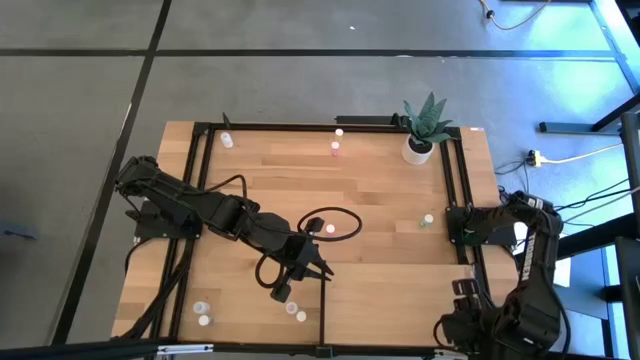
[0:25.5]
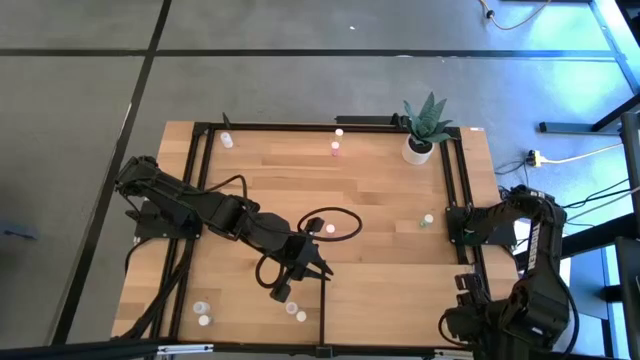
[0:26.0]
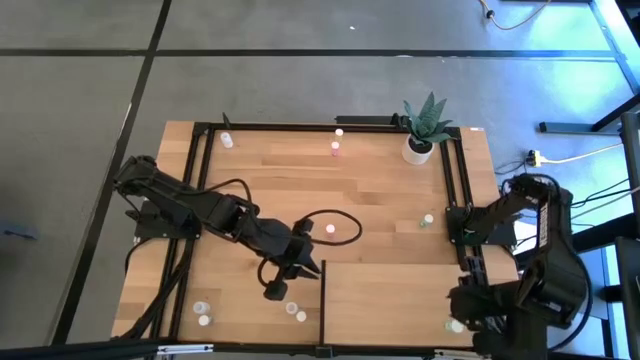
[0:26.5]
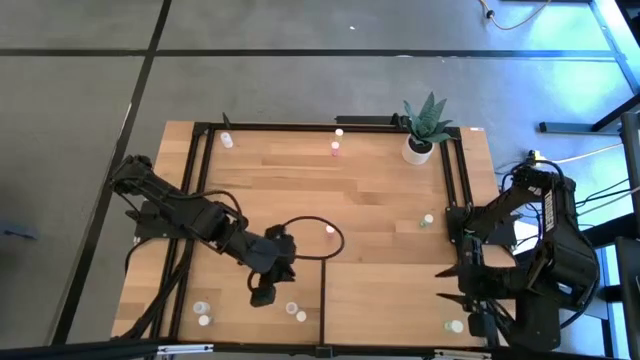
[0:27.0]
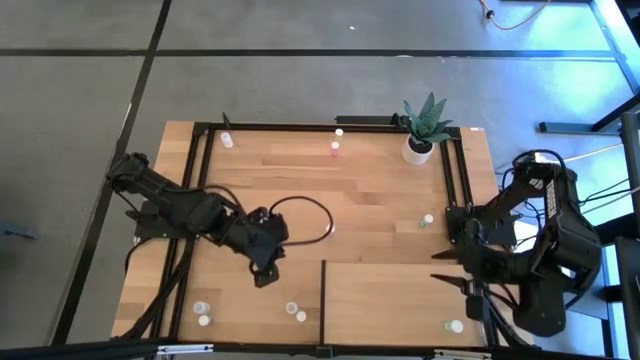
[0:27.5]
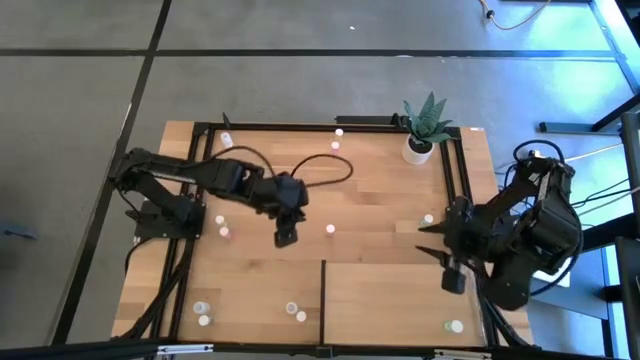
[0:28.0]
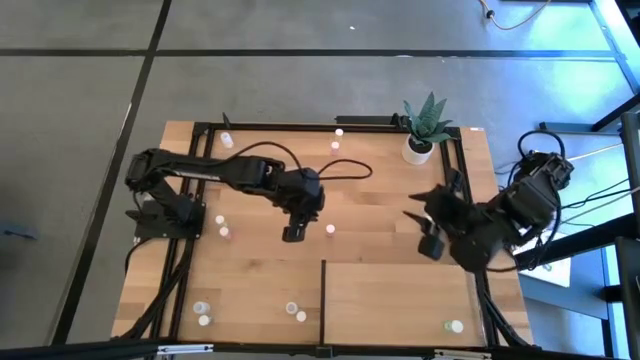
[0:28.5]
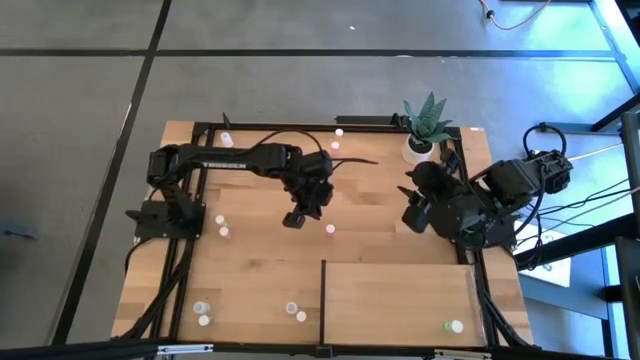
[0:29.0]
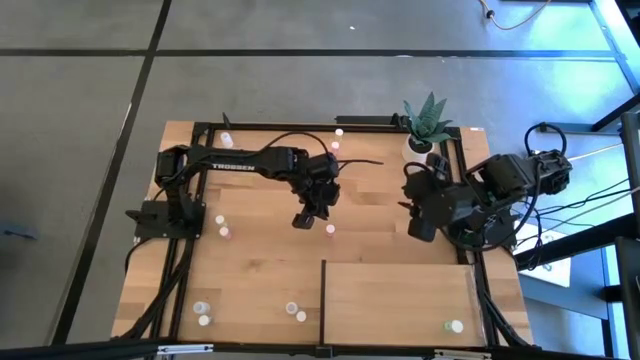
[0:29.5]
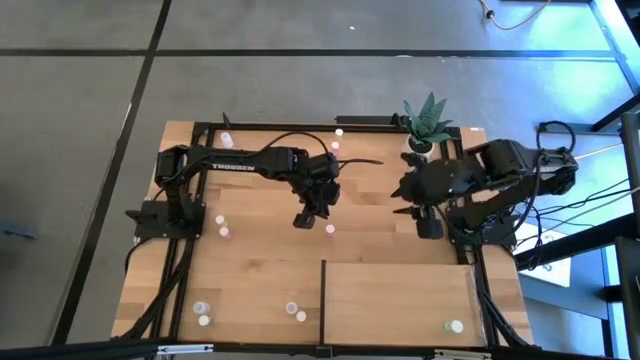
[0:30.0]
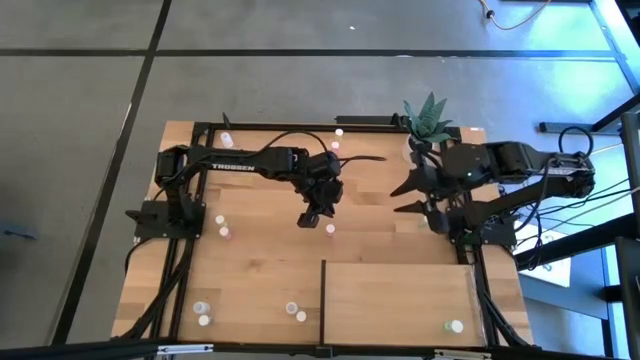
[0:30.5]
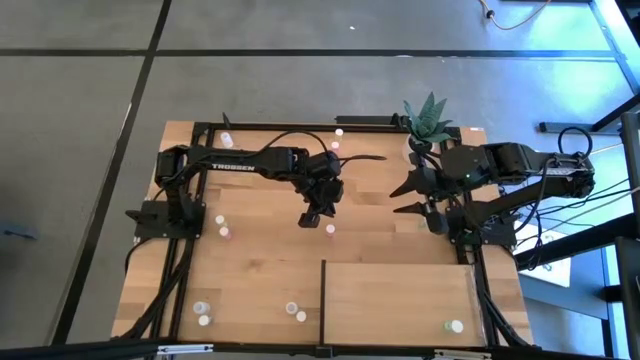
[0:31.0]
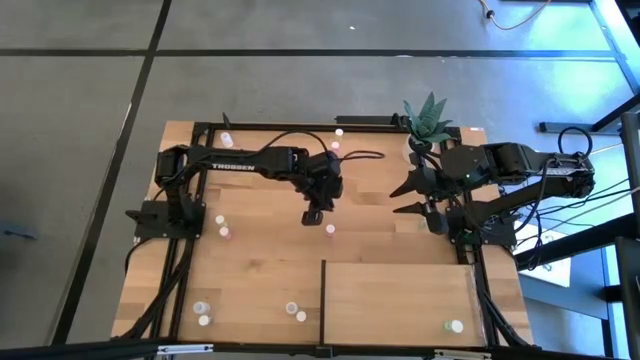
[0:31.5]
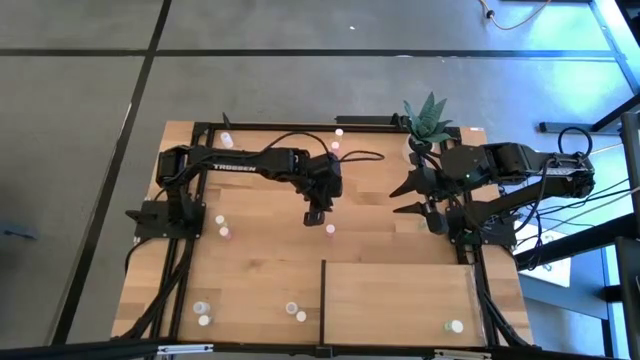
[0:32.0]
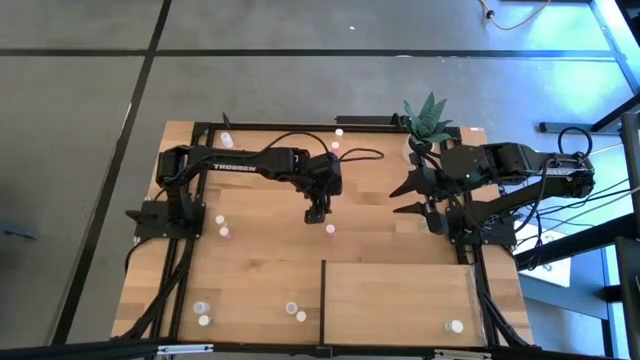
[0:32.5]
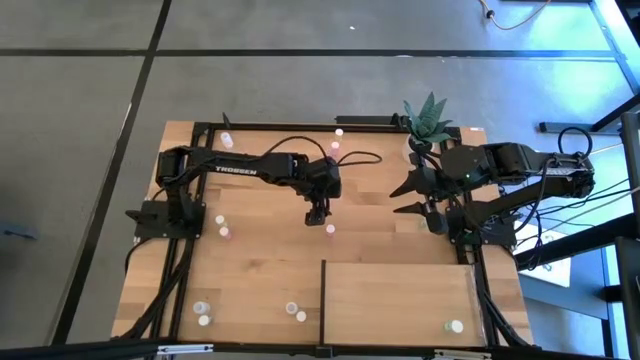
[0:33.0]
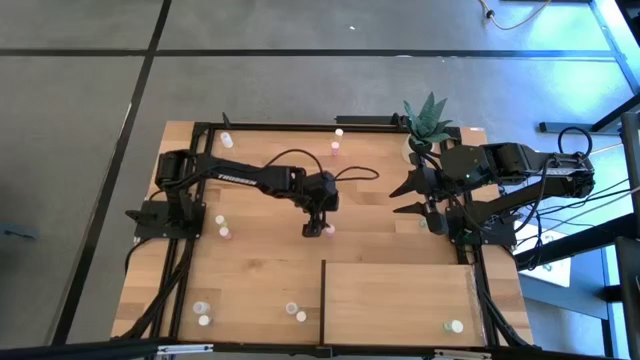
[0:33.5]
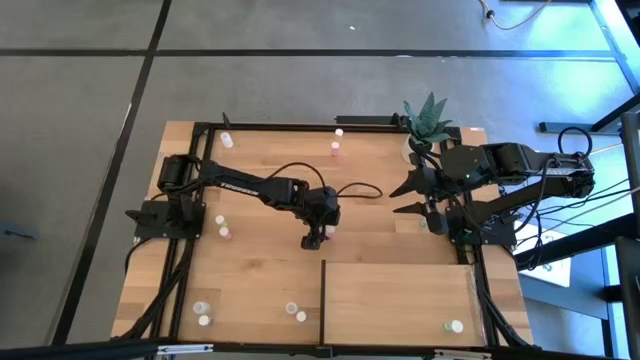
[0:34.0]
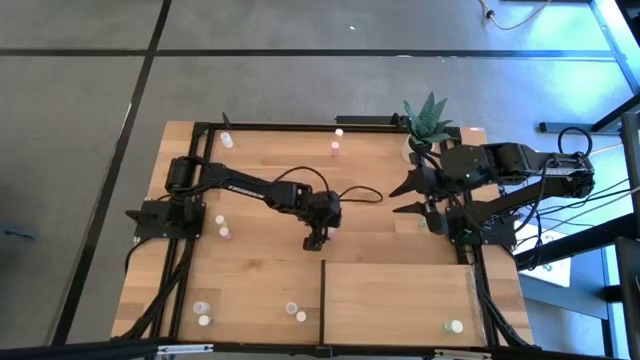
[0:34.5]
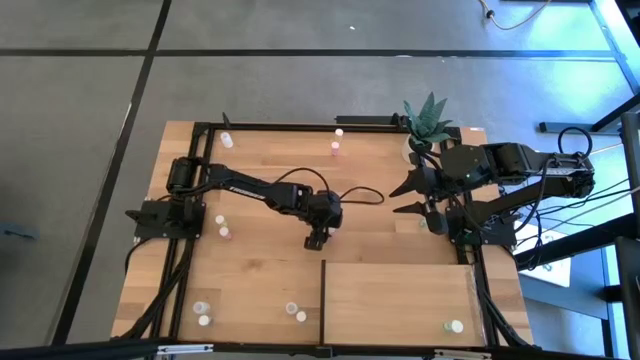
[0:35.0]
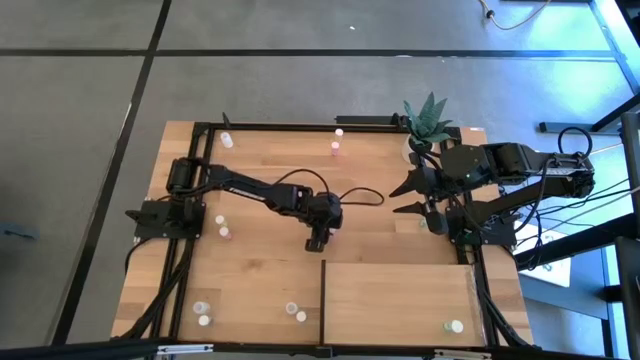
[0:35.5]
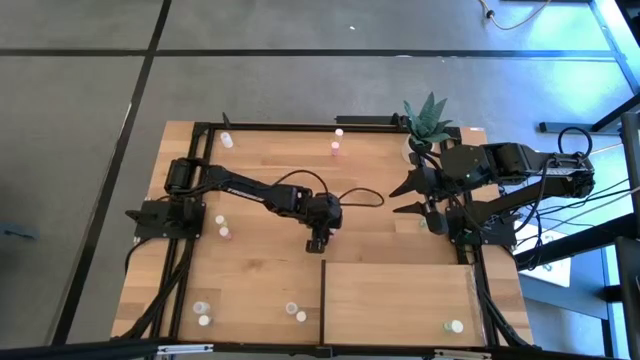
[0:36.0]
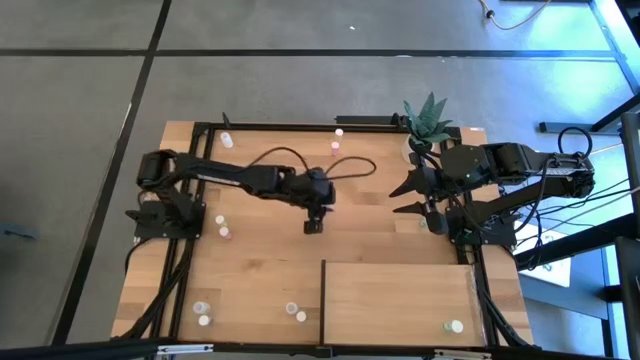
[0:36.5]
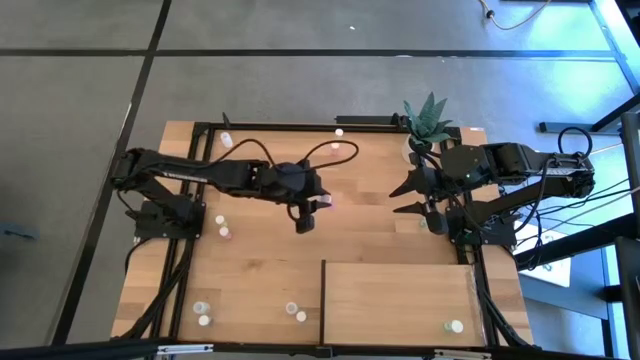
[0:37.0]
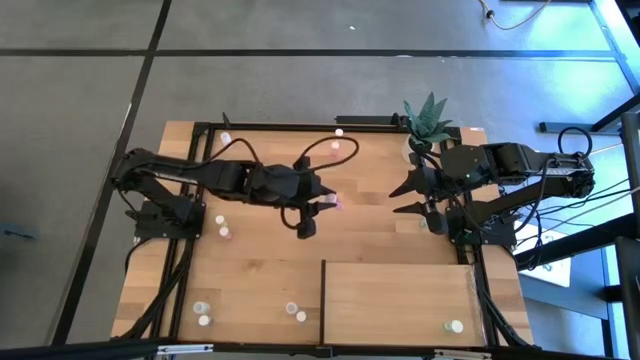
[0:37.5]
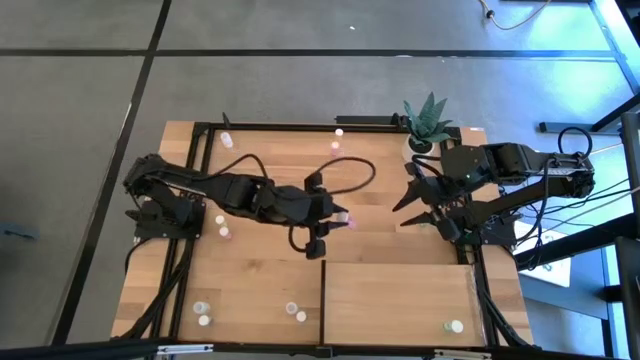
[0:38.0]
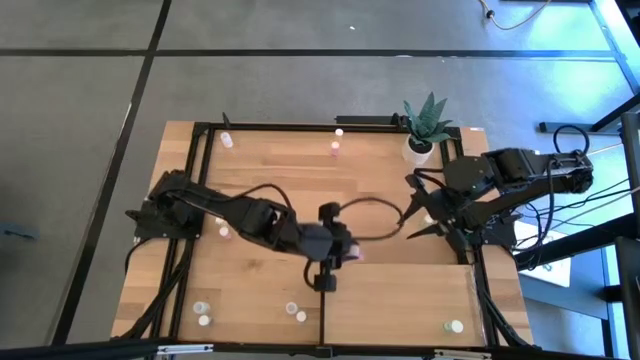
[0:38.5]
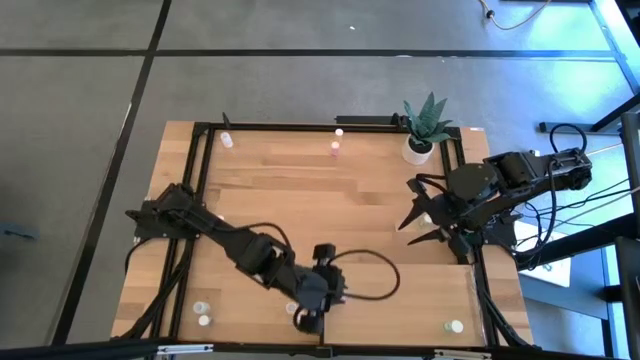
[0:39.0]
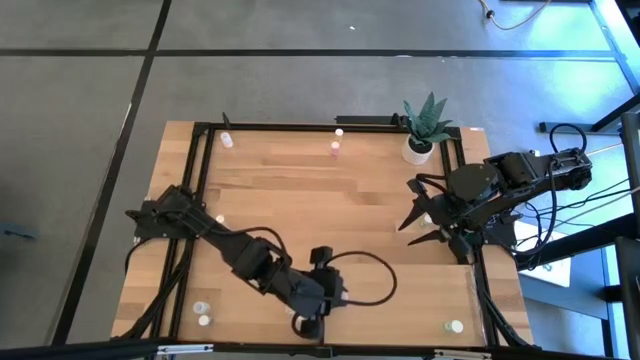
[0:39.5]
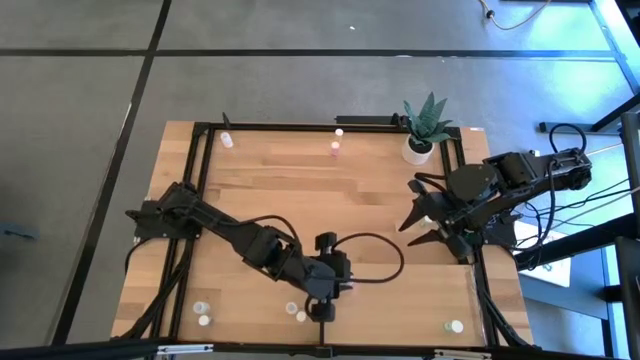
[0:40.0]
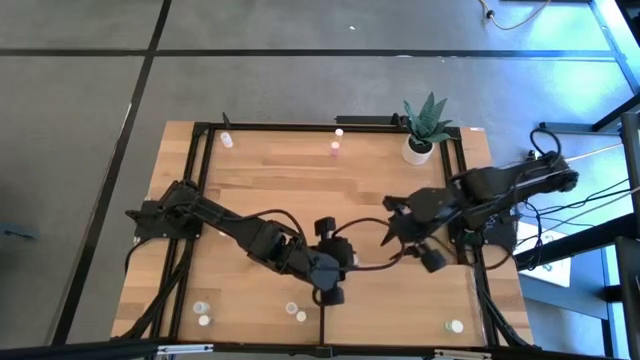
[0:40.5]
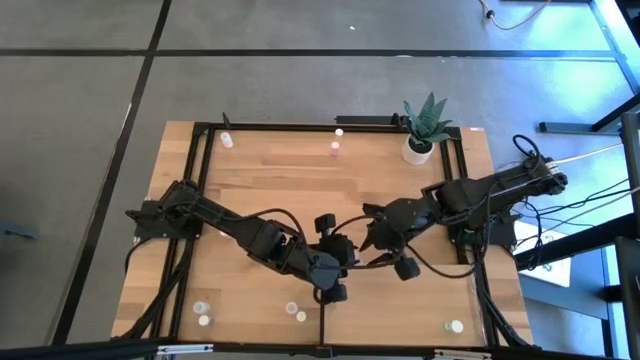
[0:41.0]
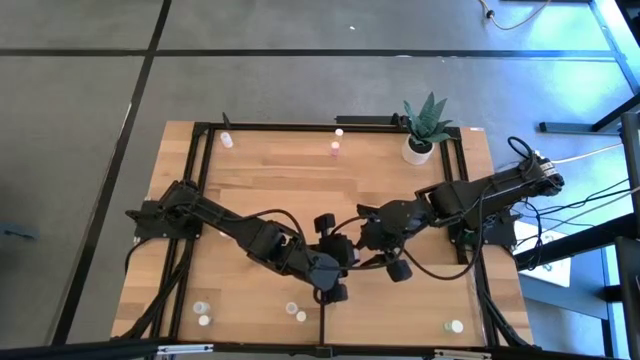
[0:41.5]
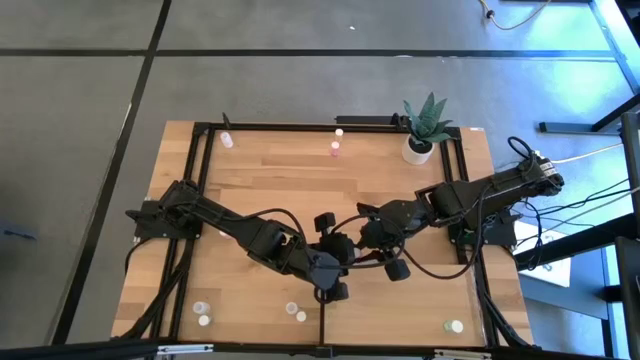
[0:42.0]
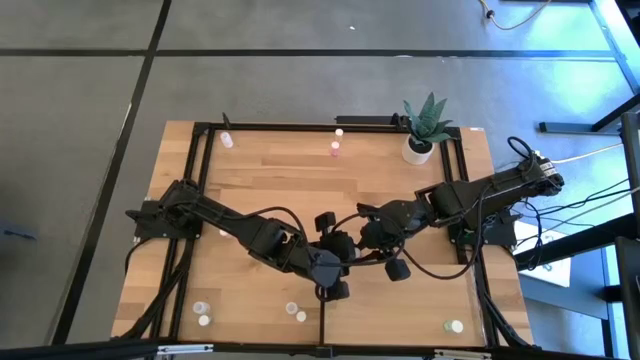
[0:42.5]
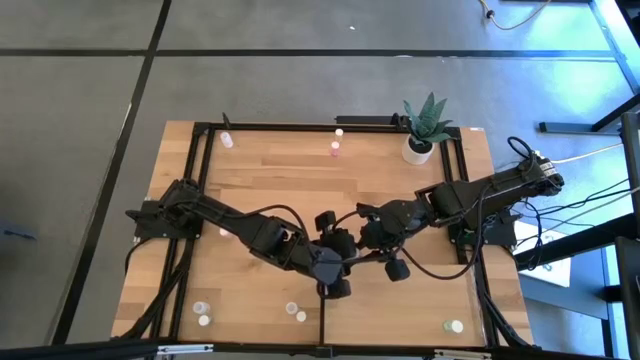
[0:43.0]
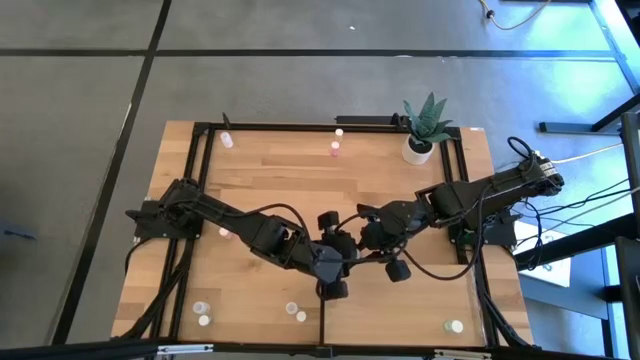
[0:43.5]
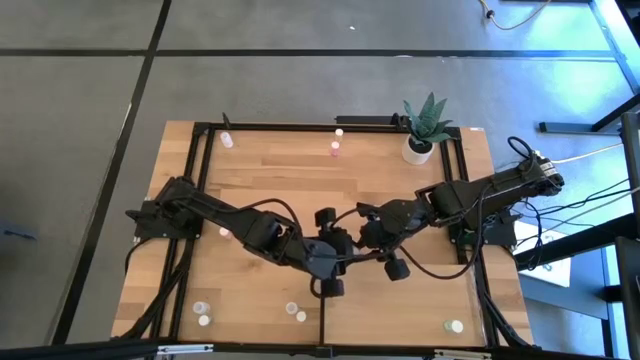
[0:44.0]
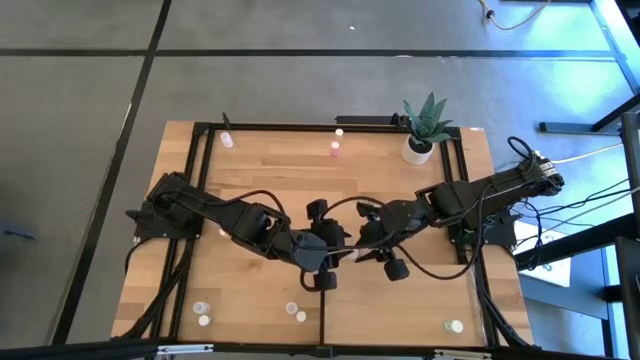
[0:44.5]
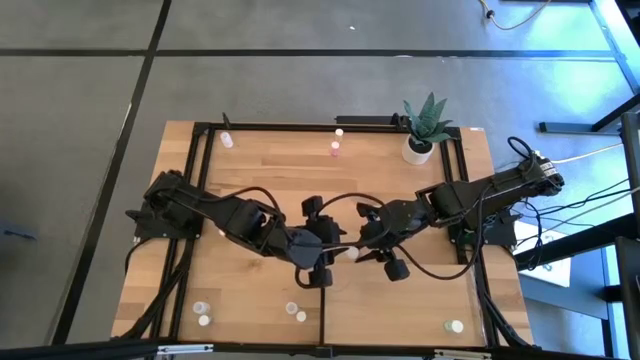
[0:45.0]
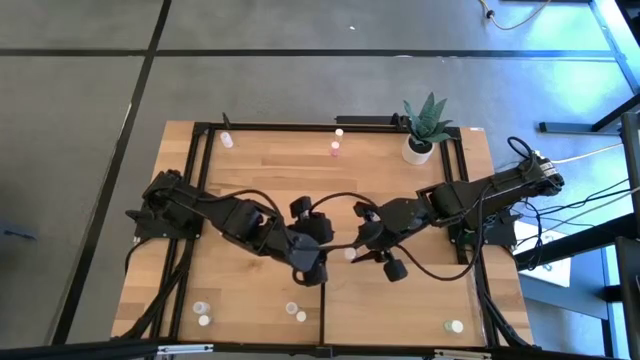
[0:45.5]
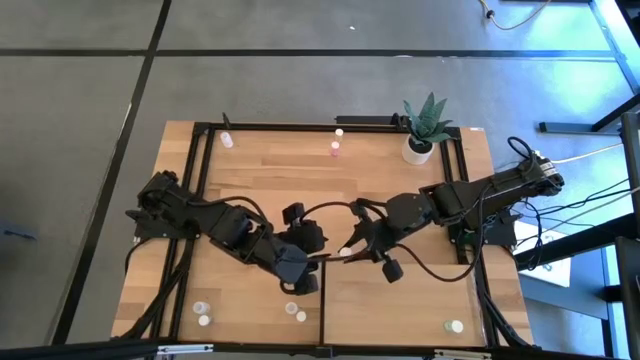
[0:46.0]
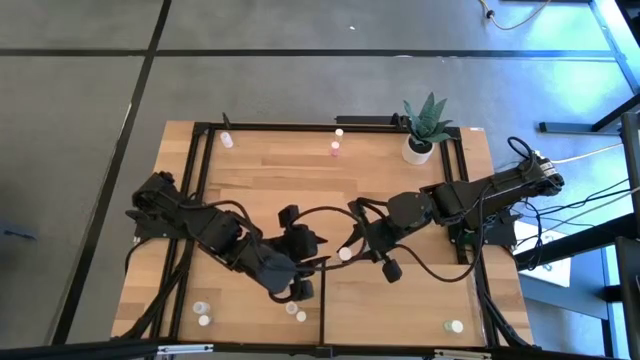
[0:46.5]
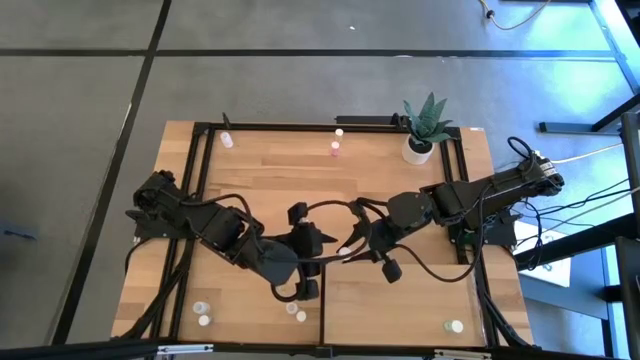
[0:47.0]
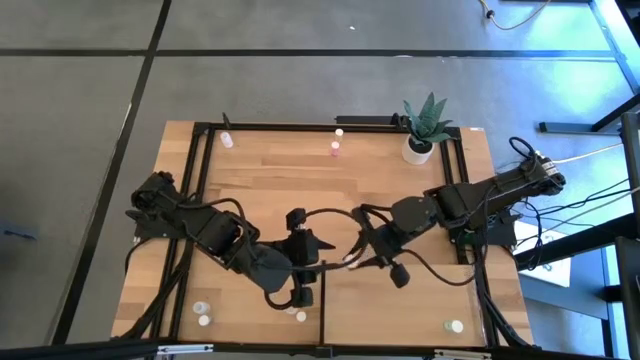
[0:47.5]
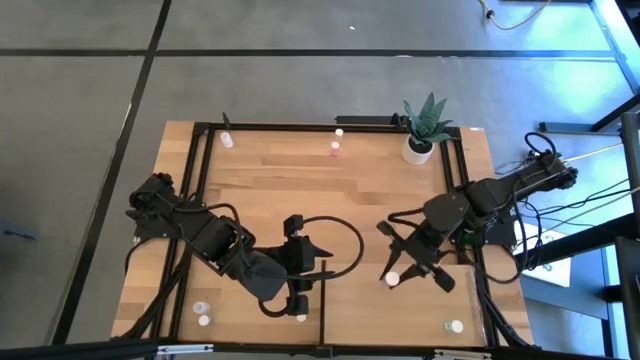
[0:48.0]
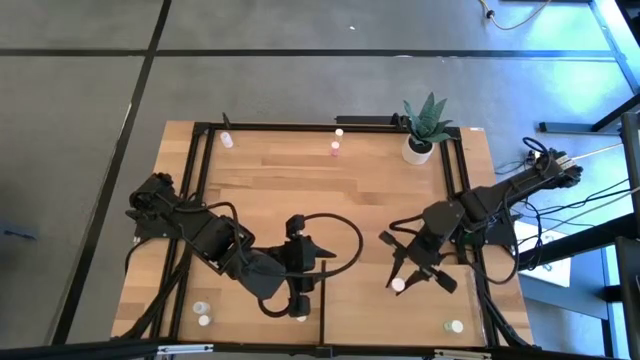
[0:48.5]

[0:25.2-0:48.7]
Task: Pick and place medicine bottles onto shelf by color
Put the bottom right pink pill bottle on the shelf
